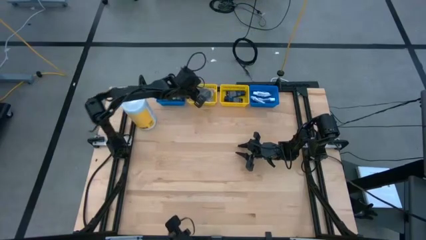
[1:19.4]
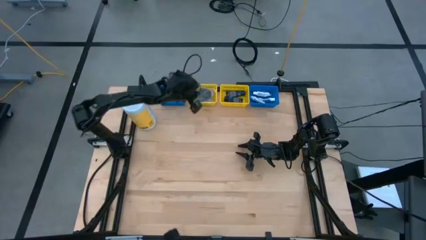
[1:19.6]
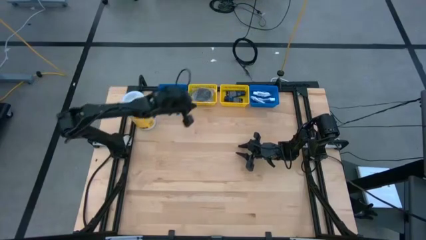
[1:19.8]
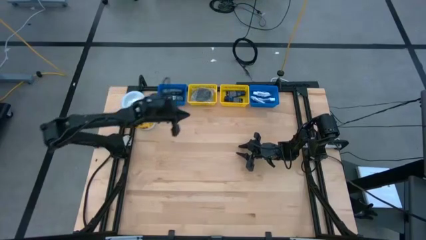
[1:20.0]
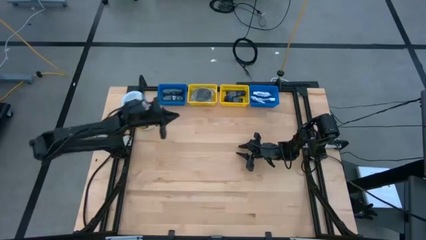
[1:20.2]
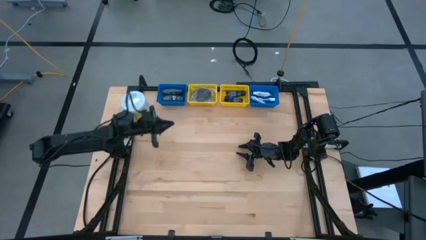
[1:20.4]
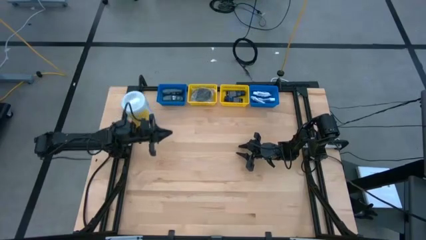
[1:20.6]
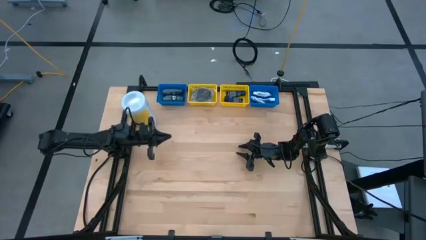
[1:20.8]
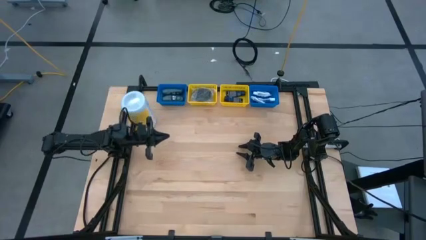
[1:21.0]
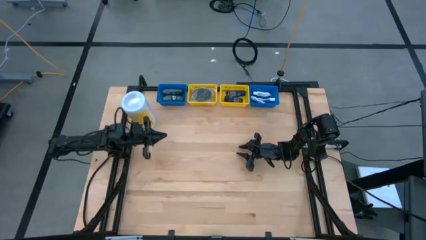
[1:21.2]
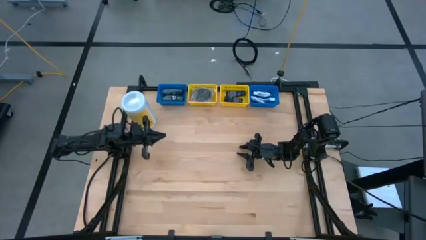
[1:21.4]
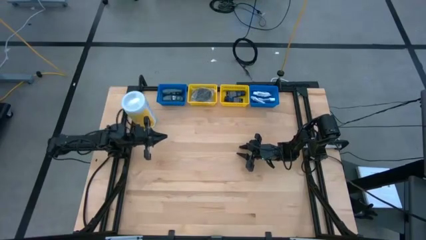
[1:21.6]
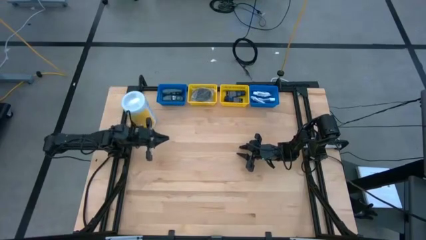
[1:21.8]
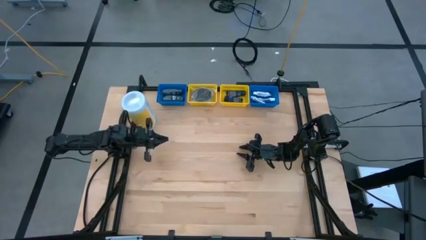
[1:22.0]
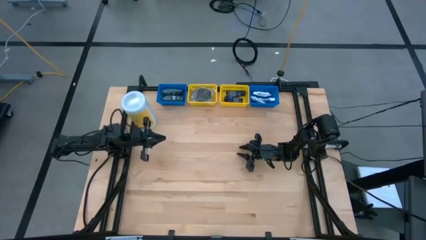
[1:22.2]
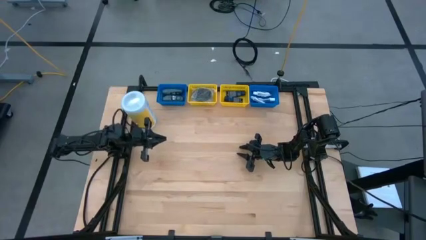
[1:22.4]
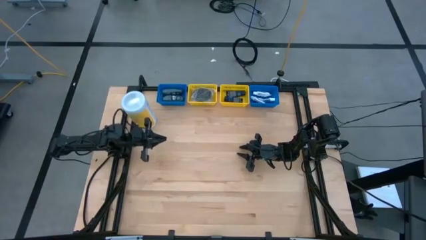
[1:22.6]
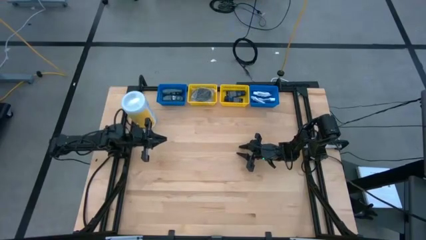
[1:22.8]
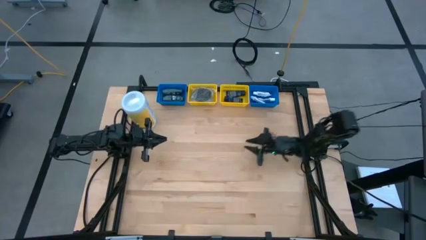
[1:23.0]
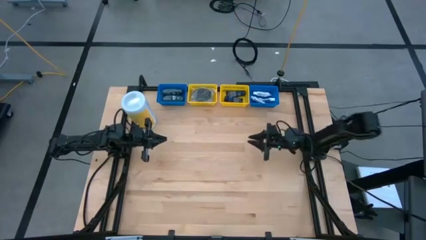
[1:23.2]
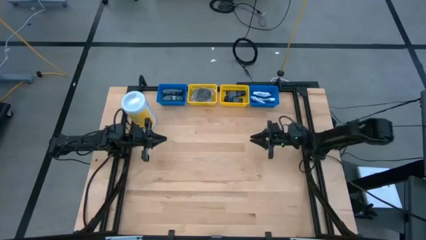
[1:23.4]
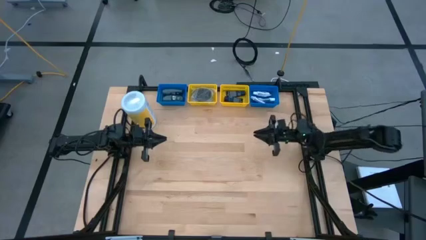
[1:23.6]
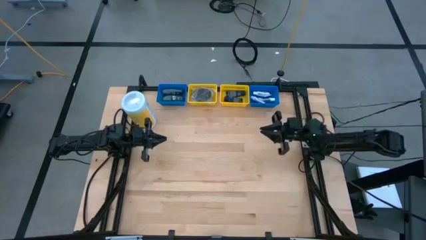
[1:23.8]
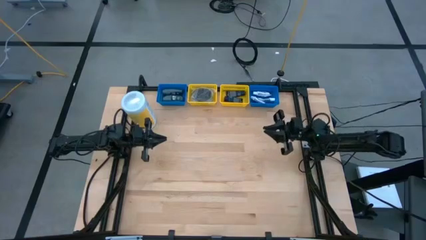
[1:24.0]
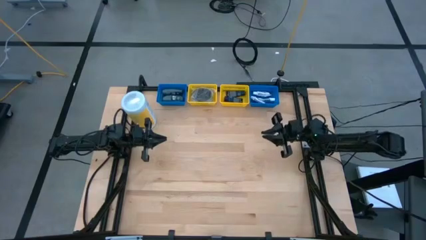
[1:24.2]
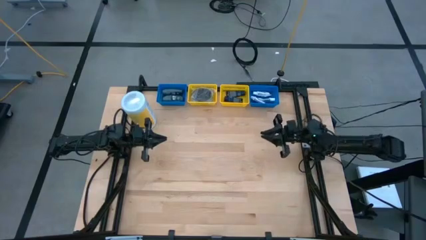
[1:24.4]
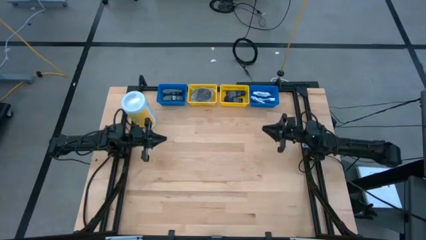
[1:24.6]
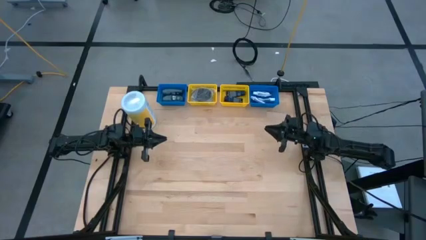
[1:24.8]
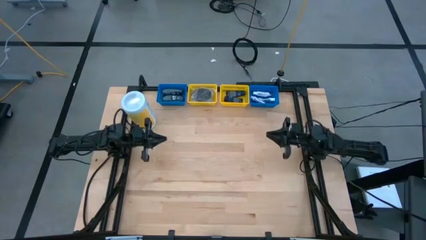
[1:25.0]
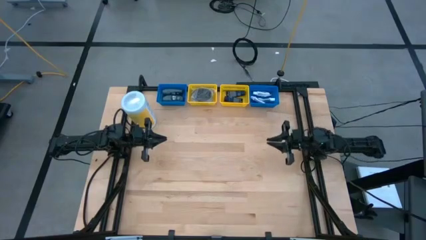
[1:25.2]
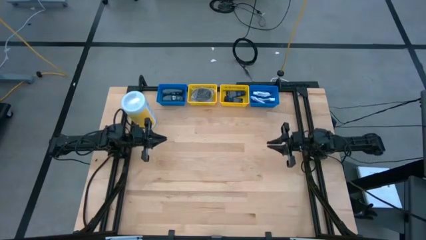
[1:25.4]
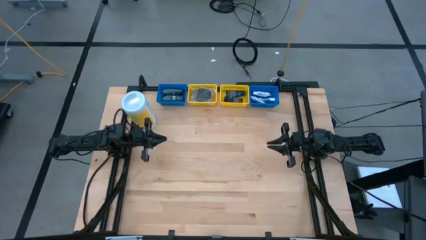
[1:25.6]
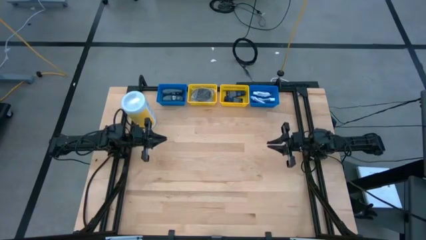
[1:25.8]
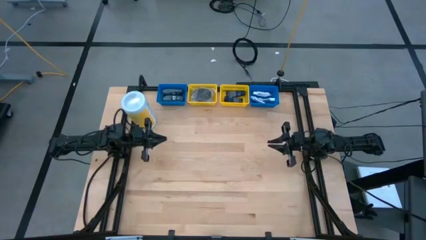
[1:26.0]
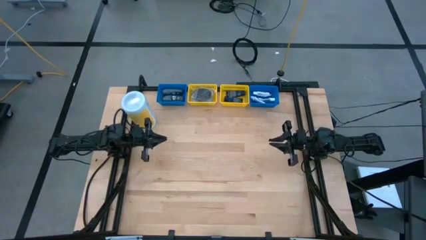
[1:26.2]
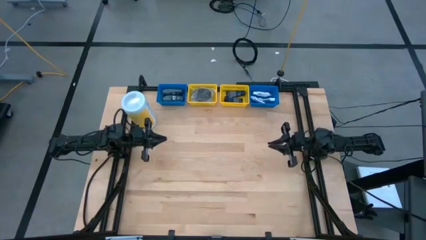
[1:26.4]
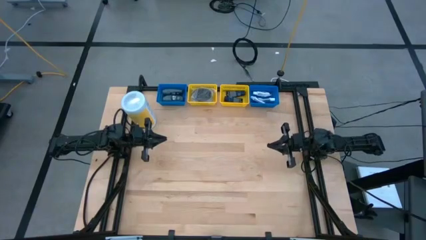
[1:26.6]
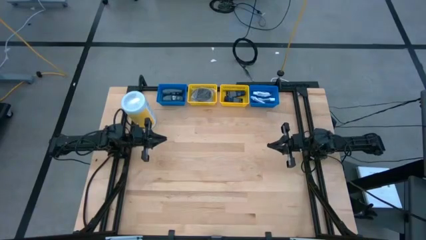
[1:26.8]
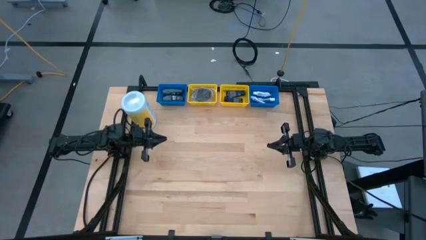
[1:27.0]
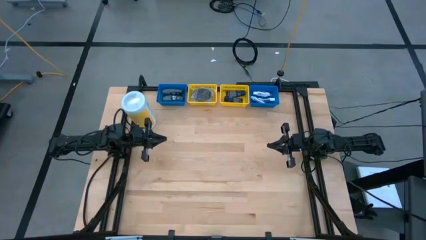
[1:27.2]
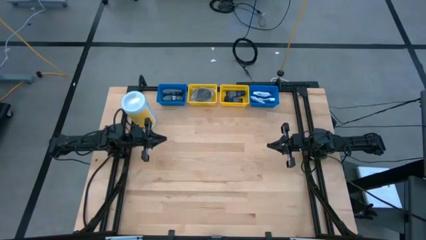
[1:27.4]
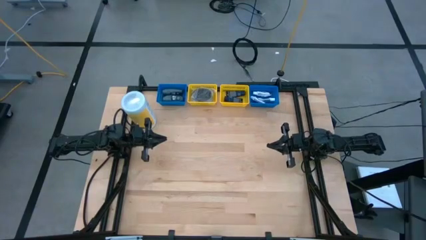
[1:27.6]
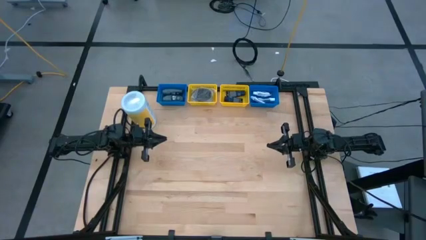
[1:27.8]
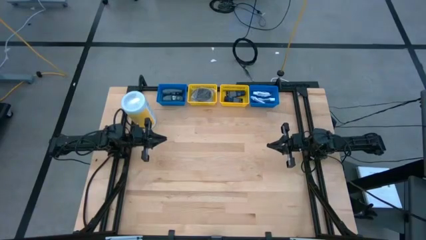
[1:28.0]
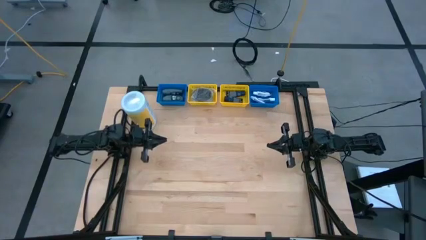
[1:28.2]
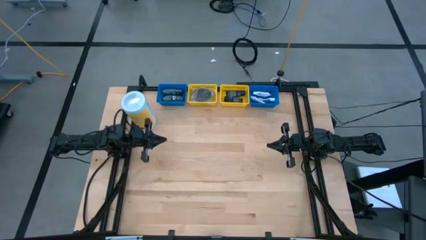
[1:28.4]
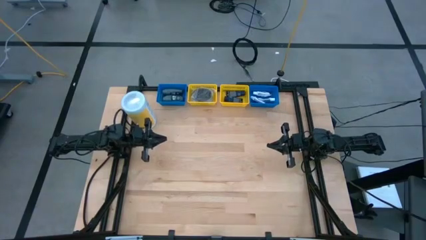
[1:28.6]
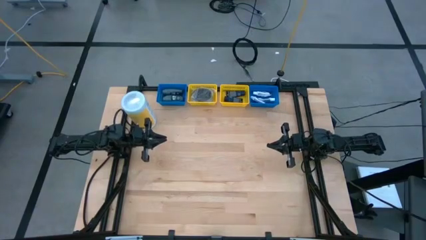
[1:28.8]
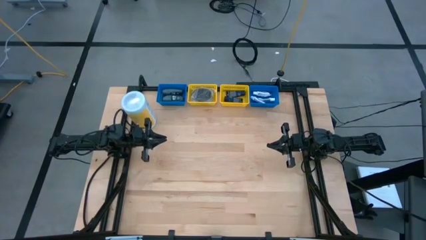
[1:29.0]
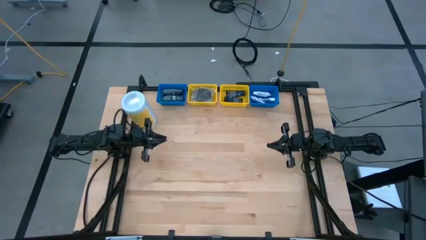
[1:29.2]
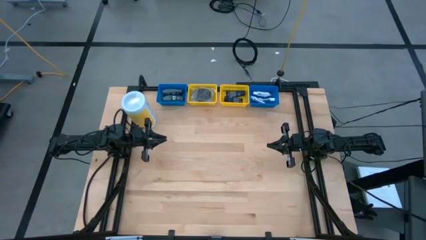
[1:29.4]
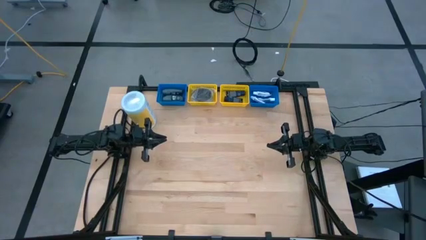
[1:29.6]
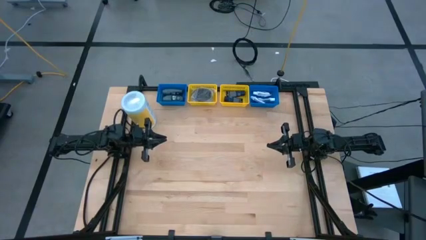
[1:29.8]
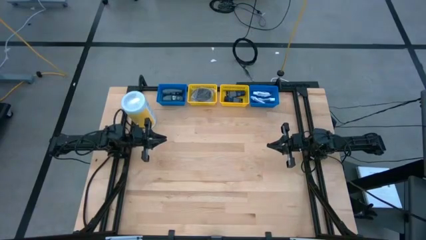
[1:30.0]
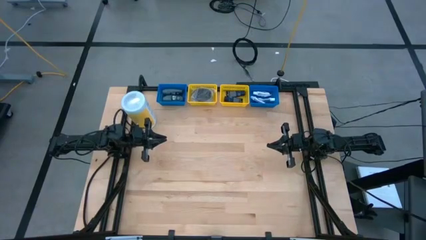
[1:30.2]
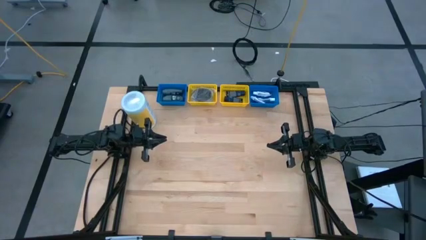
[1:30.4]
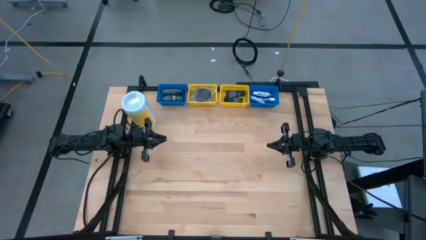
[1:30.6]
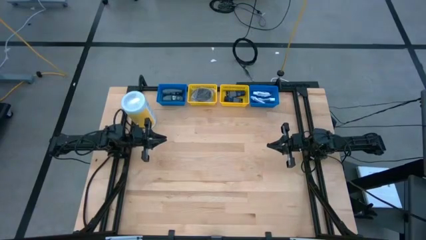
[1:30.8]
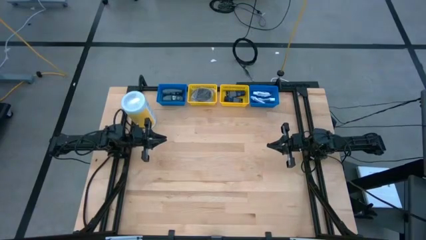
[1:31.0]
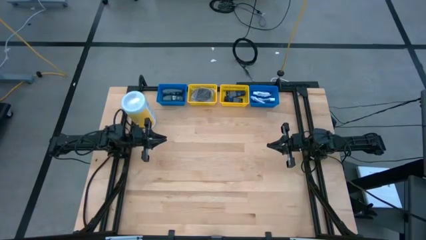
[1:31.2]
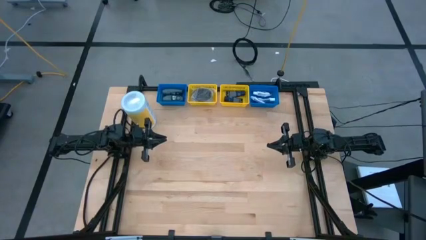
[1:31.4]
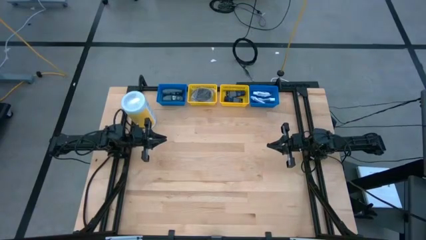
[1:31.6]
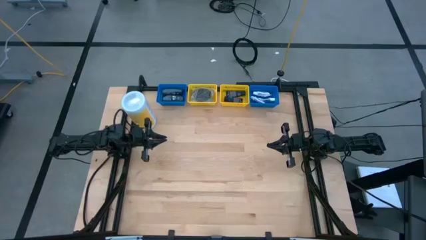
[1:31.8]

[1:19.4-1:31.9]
Task: Pick & Place Travel size toiletries
Return to Home Position
